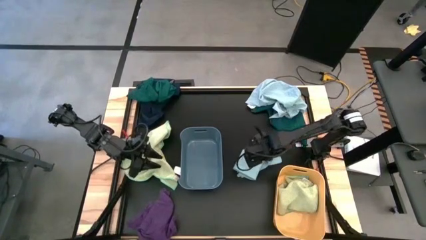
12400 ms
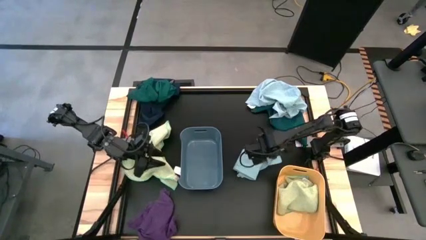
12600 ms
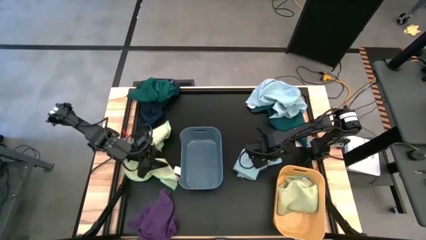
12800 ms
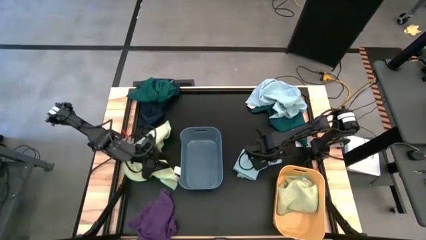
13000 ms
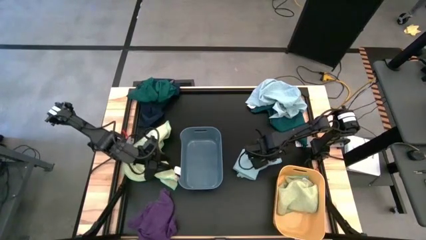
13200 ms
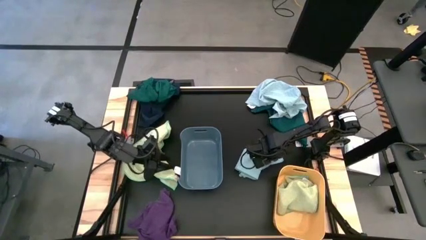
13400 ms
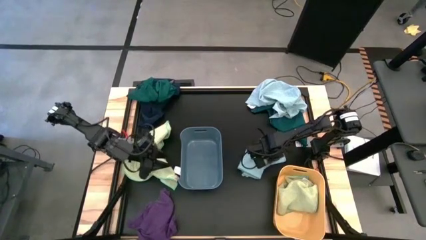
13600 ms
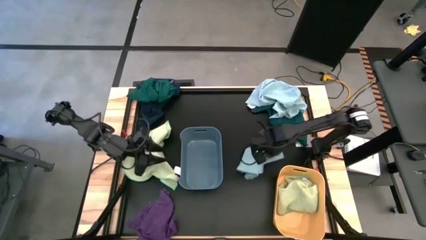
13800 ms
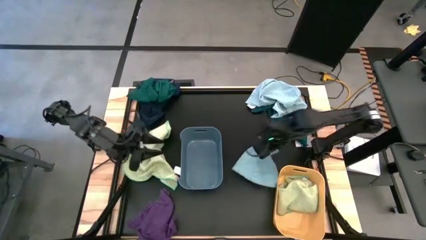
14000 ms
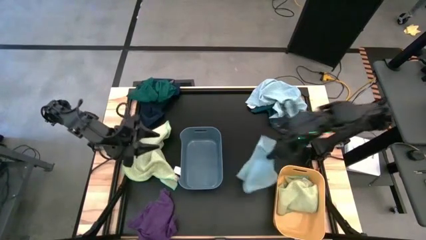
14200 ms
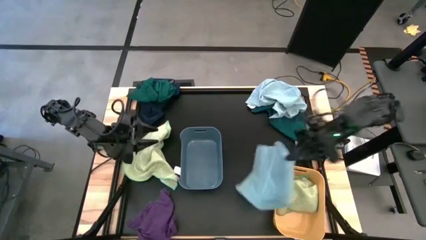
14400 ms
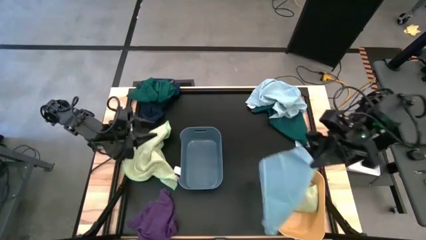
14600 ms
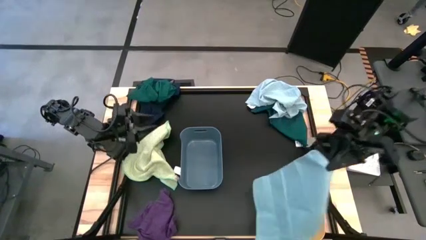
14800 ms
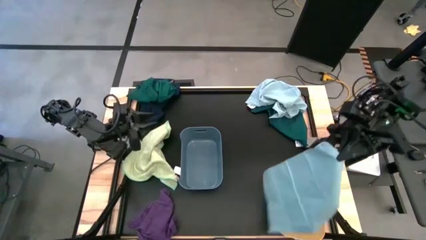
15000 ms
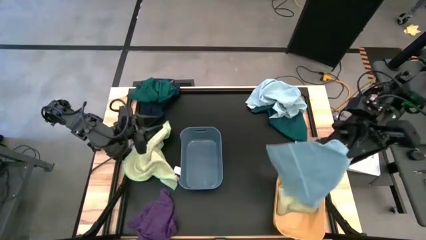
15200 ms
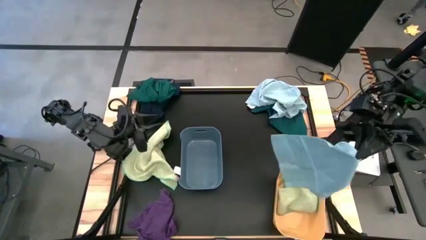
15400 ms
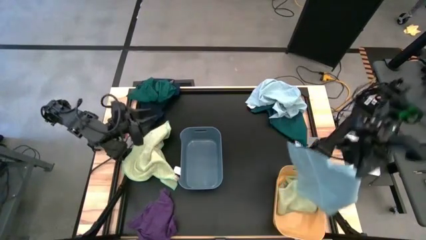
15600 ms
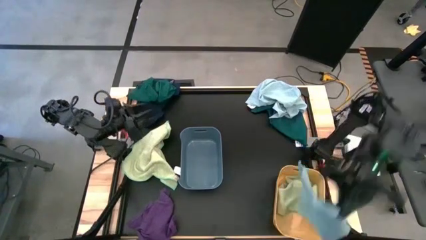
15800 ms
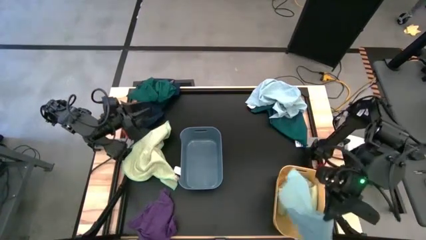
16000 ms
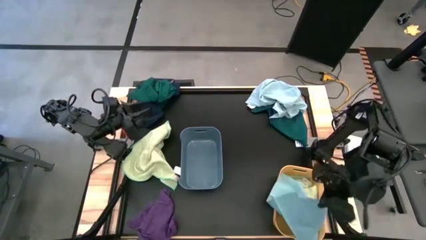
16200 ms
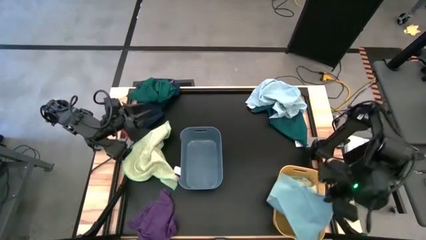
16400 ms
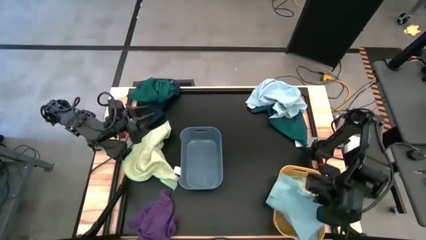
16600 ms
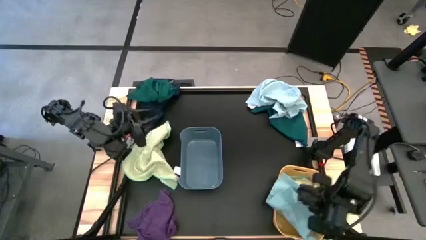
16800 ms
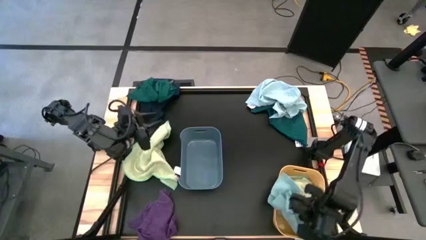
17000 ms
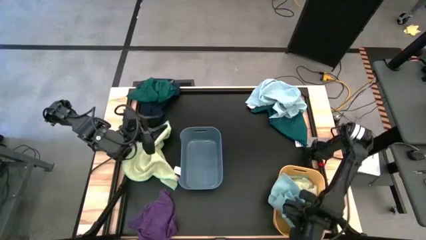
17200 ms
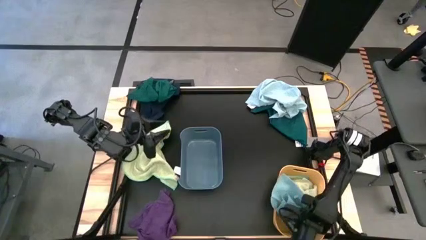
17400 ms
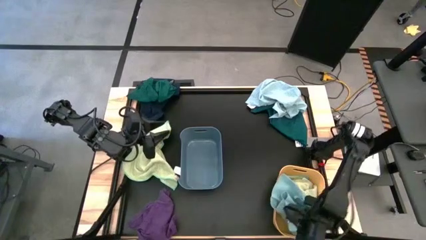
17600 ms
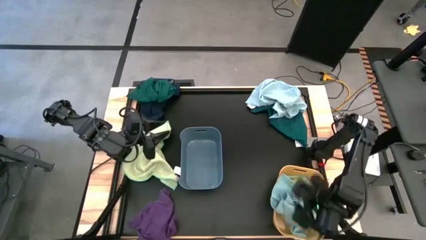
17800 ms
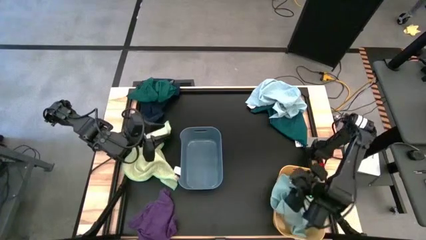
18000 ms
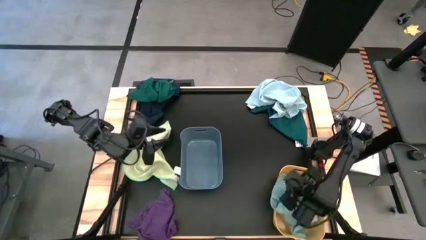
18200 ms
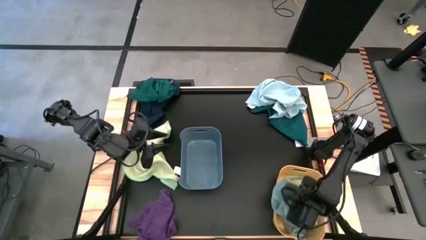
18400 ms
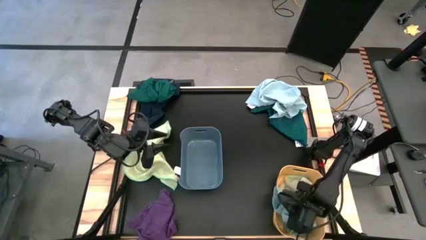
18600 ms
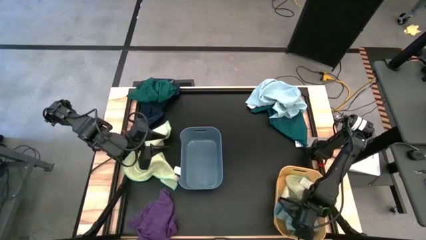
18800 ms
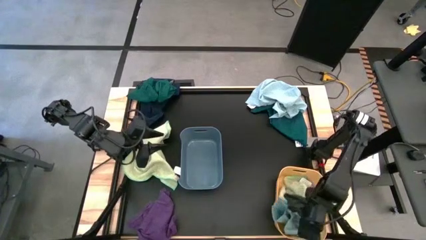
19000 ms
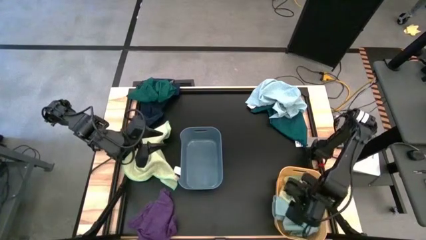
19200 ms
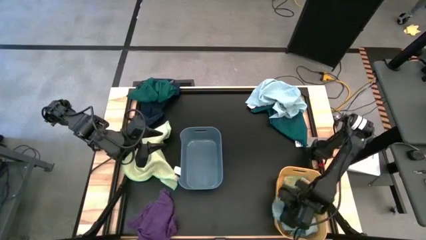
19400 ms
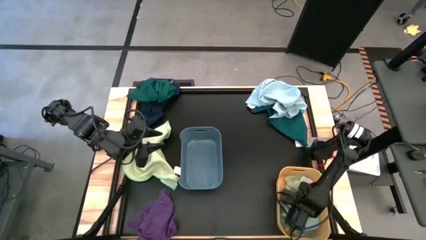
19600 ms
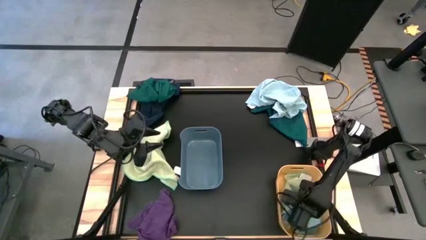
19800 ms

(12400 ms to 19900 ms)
Task: Sort microfiber towel by color & place in baskets
Put the bottom blue microfiber cloth into the yellow bin

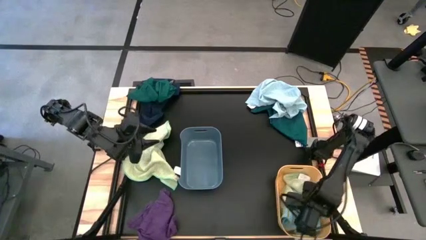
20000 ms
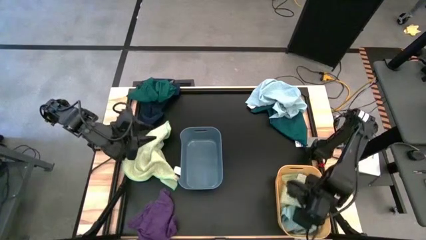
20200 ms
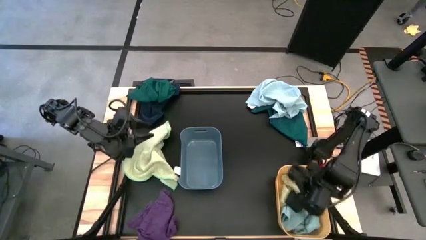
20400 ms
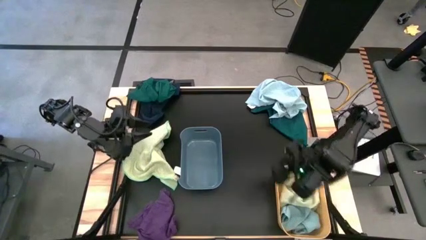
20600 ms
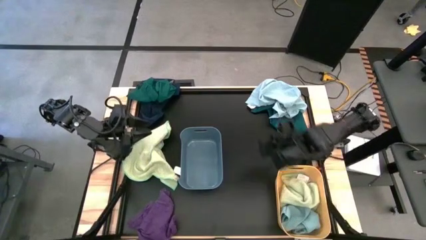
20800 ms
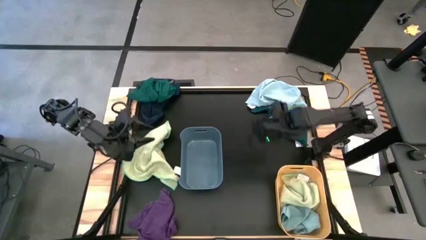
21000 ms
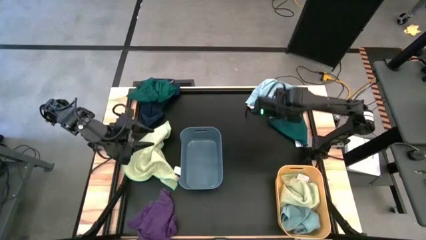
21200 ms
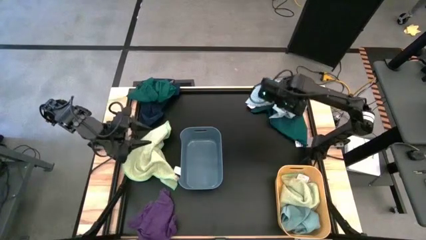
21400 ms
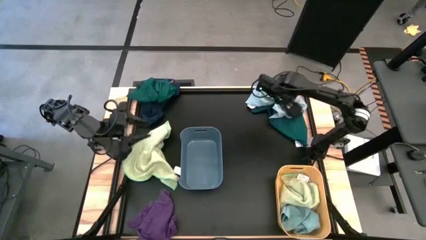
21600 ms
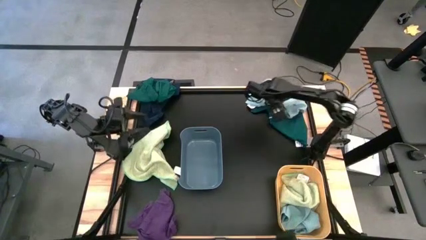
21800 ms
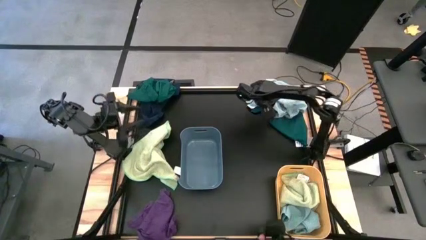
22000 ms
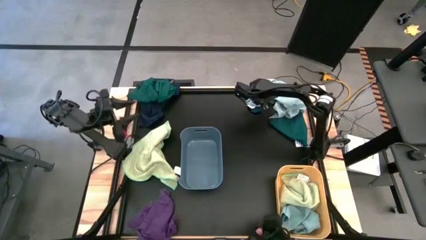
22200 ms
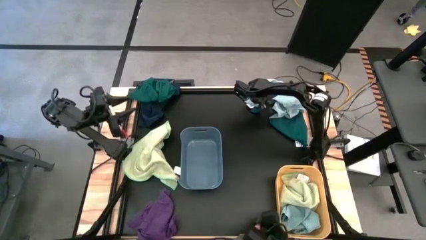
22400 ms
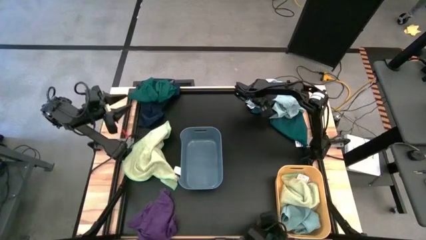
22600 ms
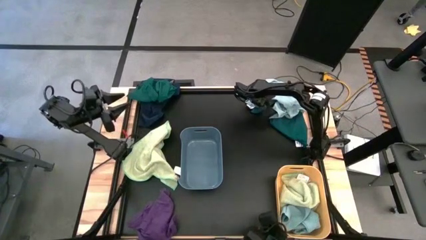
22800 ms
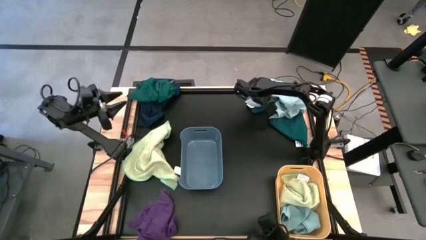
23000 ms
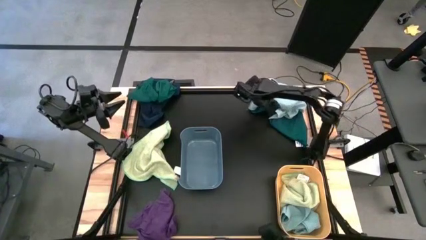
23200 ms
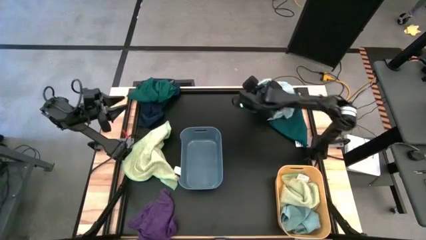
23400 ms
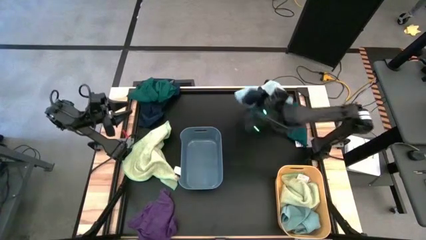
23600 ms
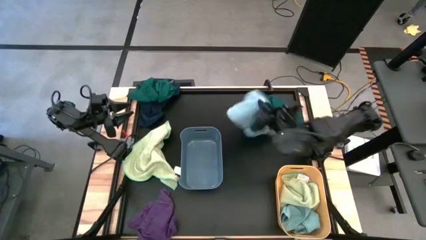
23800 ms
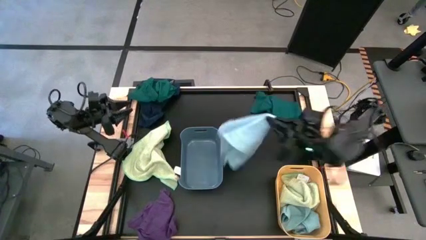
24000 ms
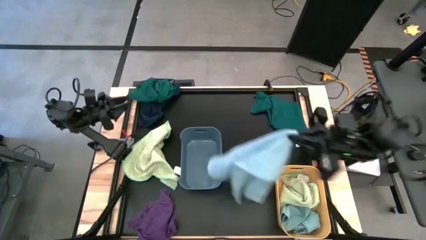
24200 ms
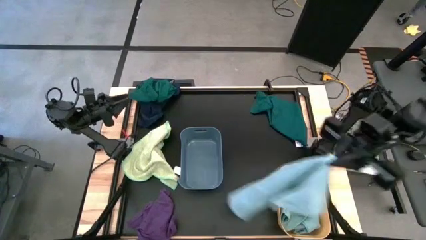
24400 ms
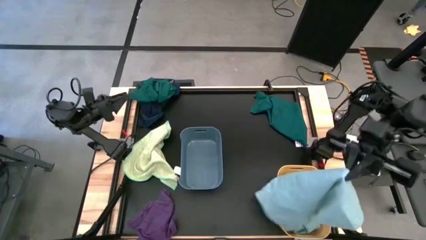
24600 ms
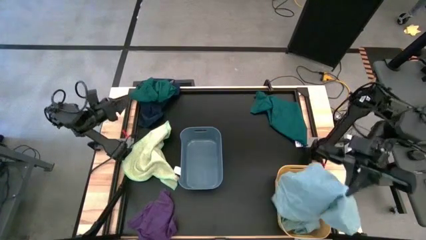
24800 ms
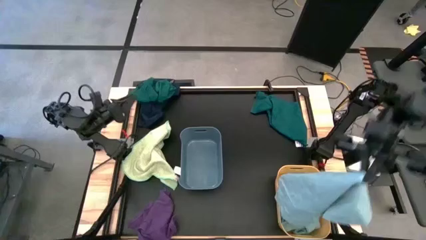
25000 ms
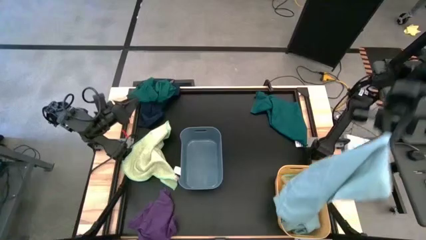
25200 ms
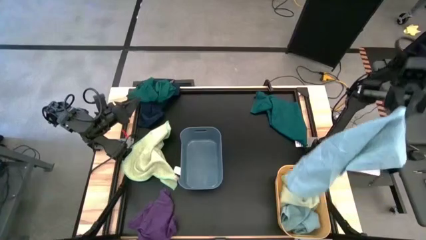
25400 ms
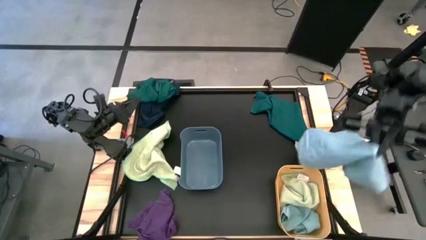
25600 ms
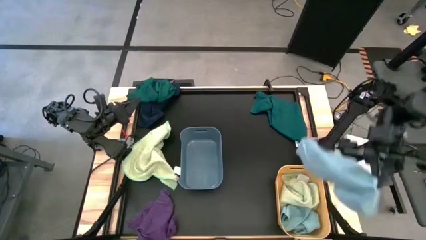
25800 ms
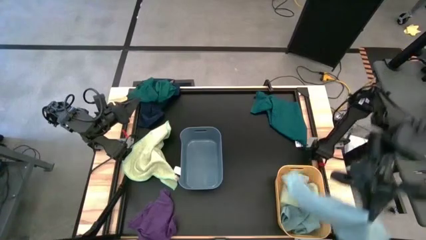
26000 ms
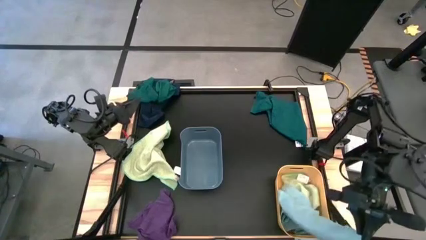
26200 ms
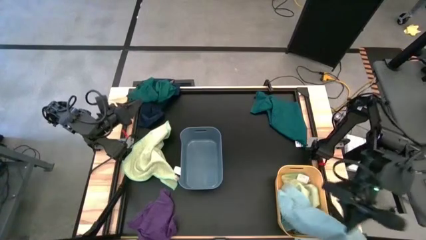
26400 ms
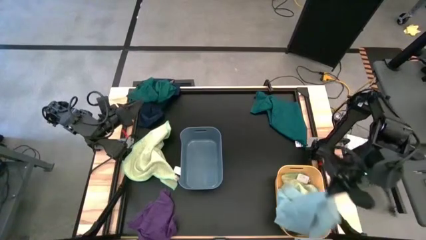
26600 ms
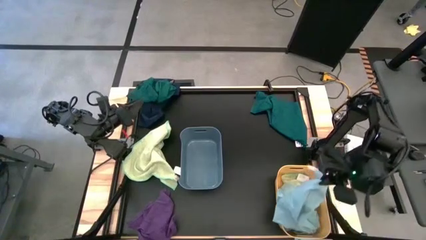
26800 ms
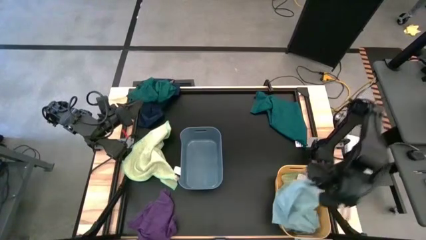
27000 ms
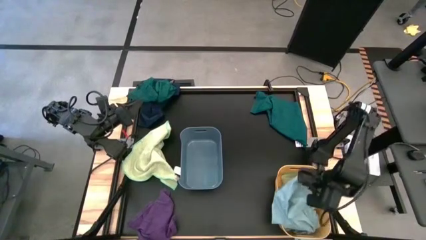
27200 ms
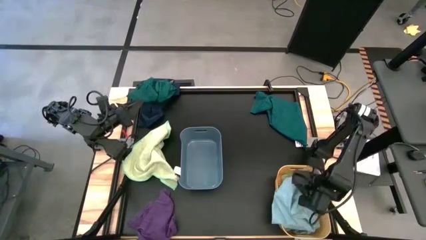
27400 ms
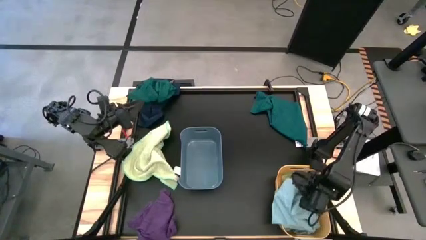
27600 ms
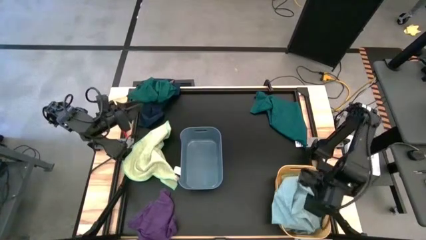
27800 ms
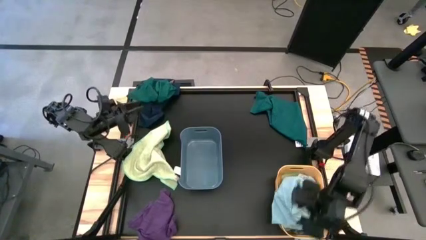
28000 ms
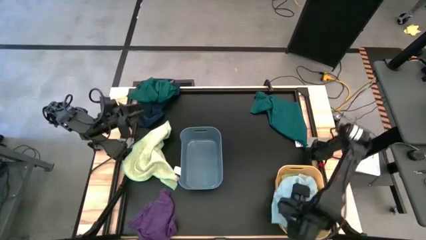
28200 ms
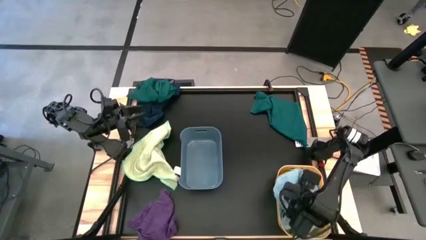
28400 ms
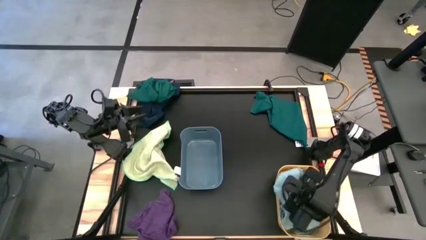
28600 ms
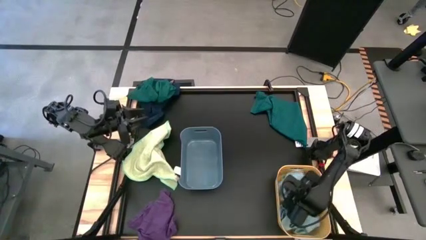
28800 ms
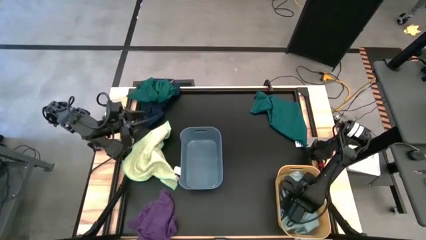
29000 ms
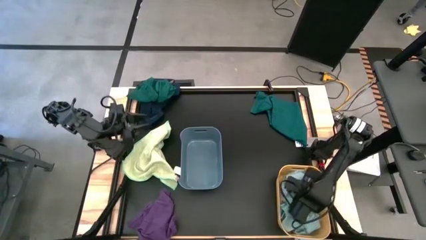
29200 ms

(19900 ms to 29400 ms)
Put the light blue microfiber cloth into the yellow bin
